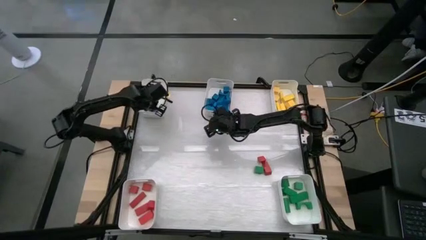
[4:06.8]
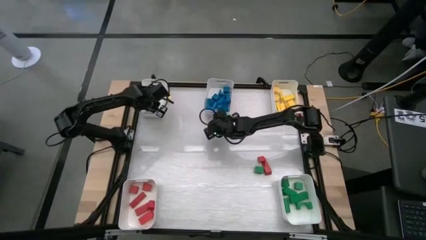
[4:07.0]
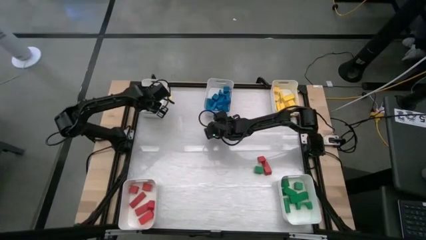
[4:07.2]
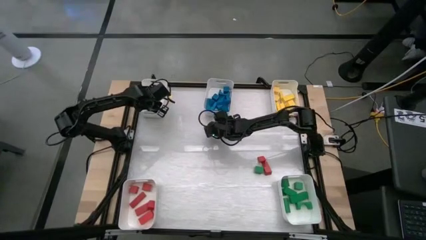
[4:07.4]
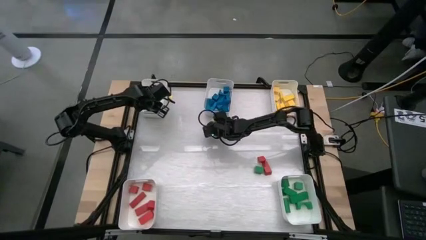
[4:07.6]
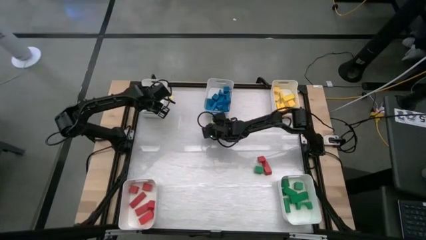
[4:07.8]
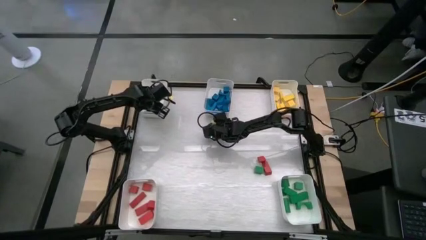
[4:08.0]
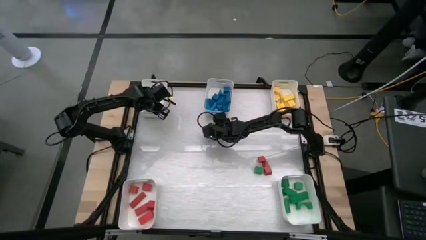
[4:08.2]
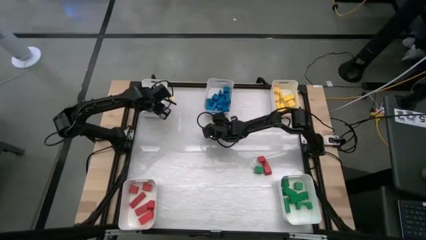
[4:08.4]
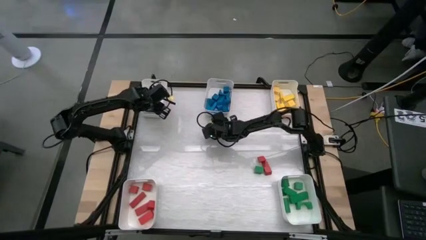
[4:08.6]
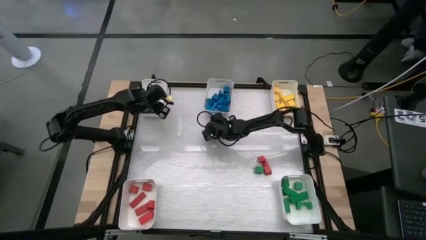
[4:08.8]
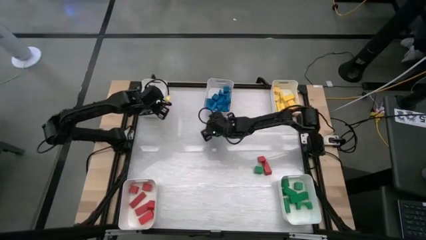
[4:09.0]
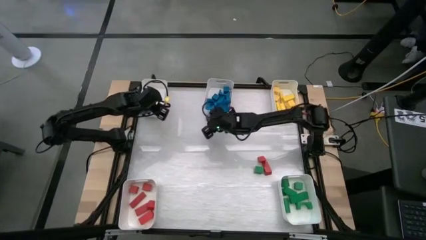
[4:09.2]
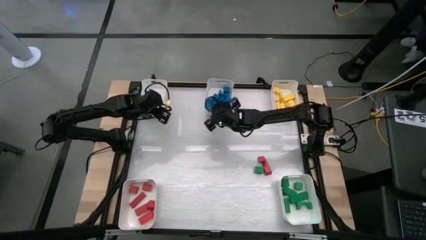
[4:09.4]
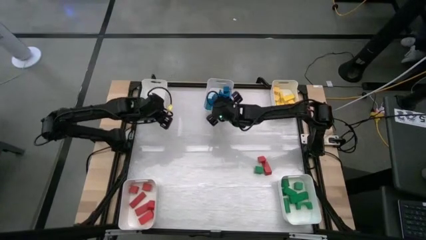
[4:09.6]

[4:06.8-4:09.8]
Task: Sort blocks
Put the blue block into the top center white bin

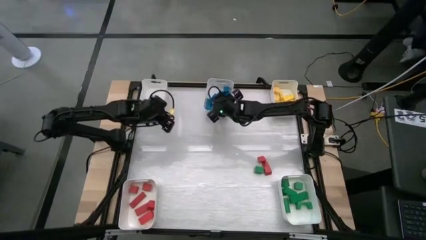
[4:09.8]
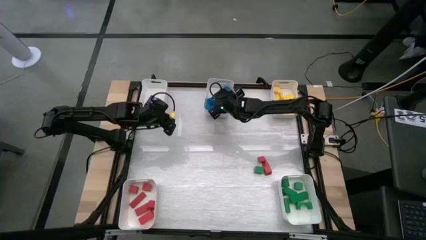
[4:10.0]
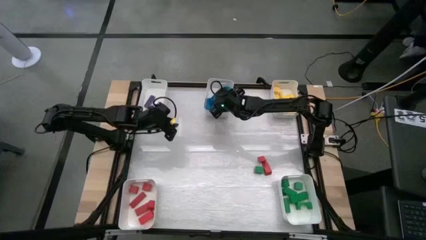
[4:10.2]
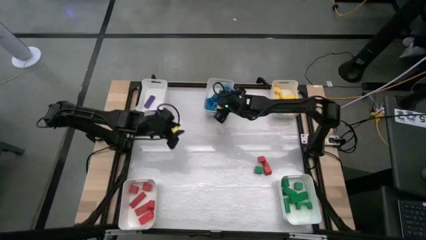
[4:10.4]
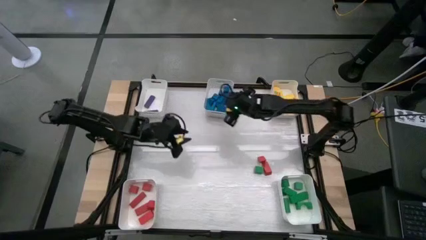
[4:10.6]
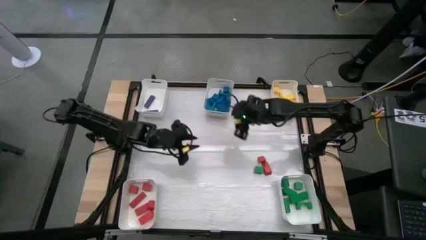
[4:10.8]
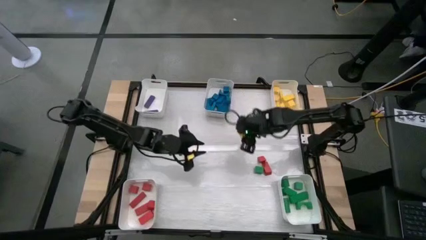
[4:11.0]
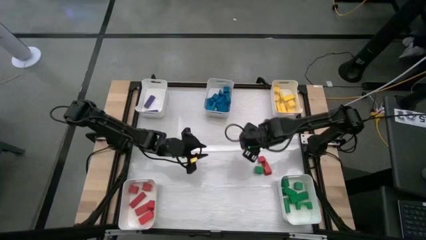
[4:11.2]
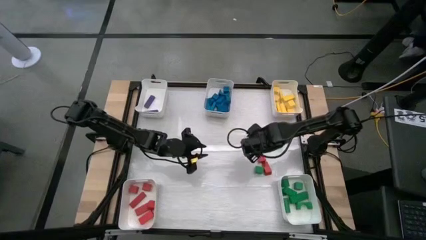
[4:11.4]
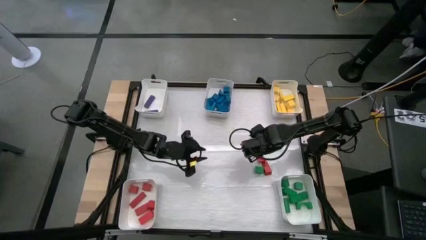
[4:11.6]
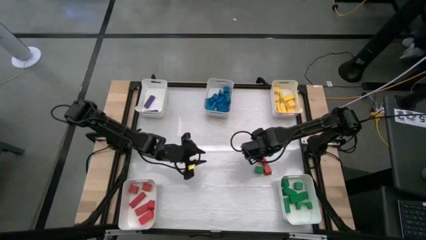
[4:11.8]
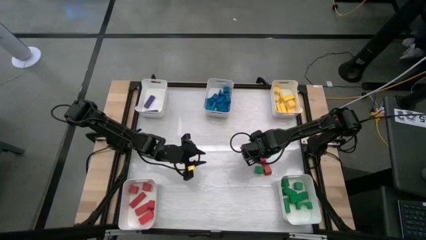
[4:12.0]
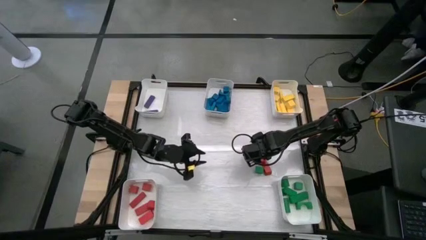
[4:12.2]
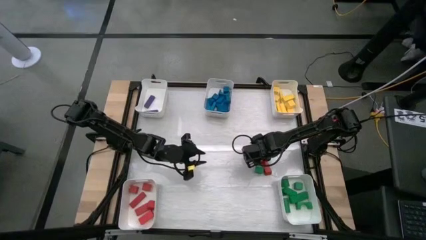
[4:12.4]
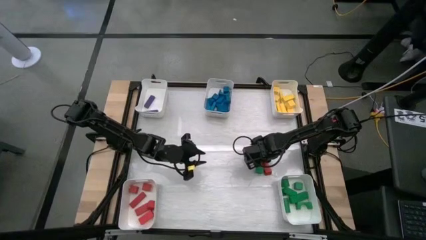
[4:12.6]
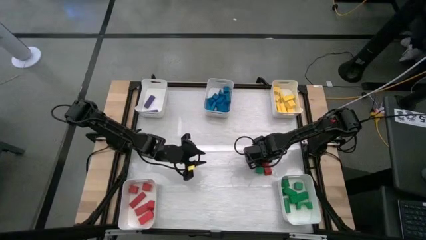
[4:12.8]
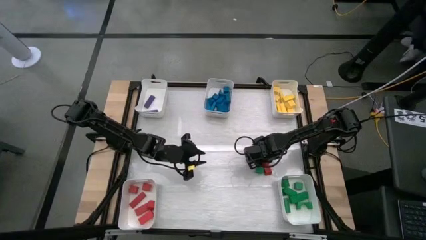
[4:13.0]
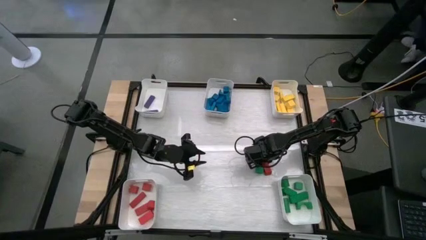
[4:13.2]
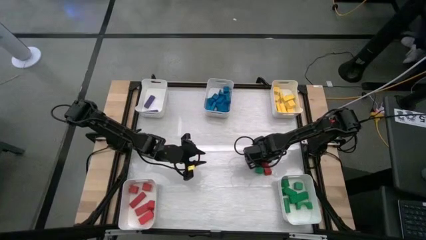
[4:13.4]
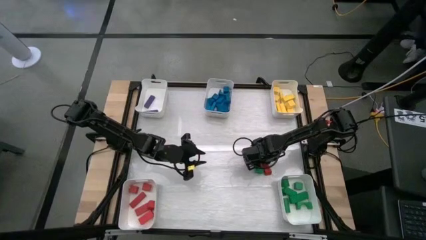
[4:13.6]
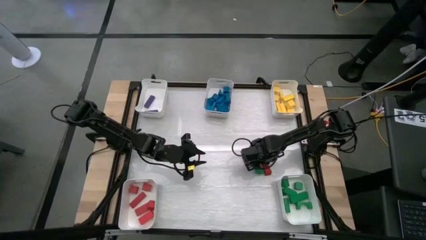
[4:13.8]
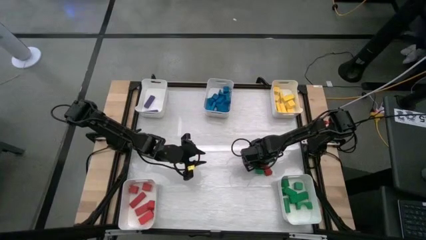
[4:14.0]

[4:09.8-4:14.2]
Put the red block into the bottom left white bin

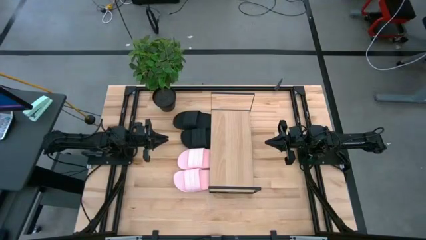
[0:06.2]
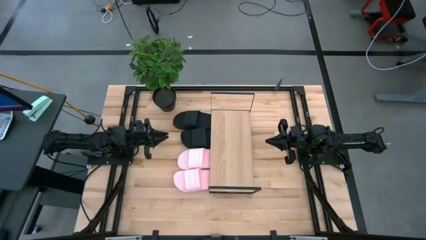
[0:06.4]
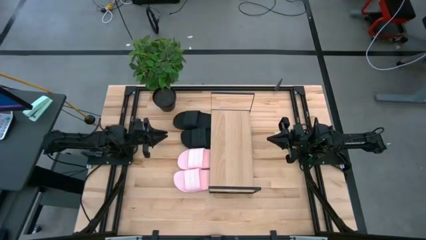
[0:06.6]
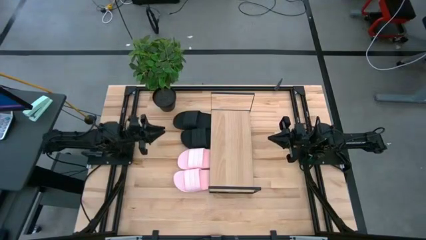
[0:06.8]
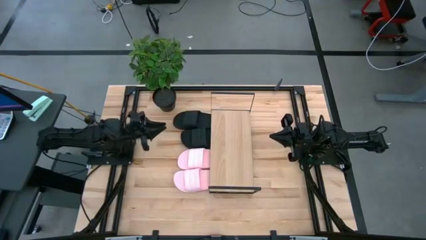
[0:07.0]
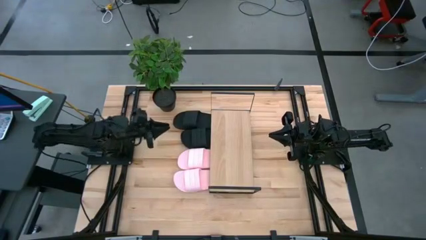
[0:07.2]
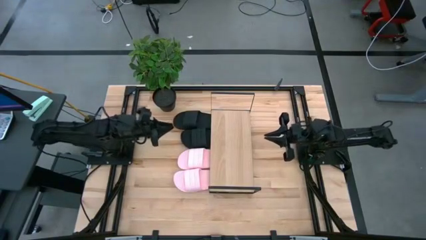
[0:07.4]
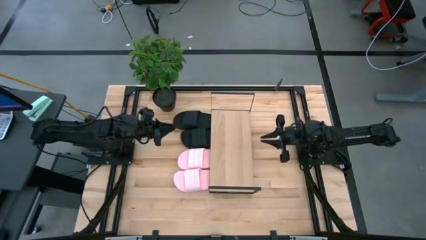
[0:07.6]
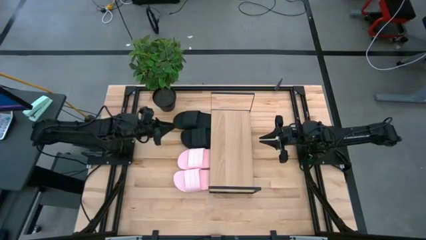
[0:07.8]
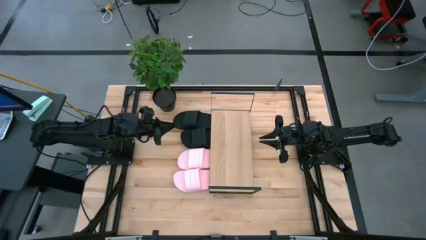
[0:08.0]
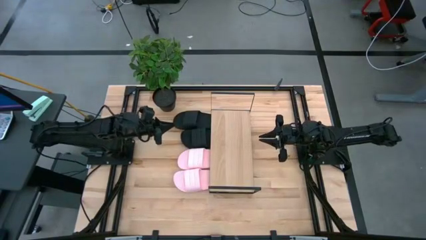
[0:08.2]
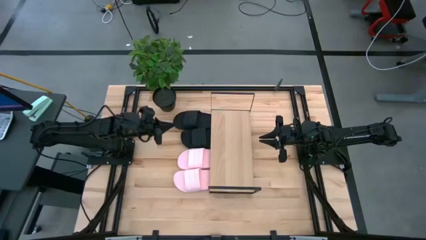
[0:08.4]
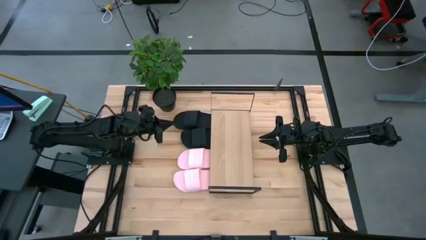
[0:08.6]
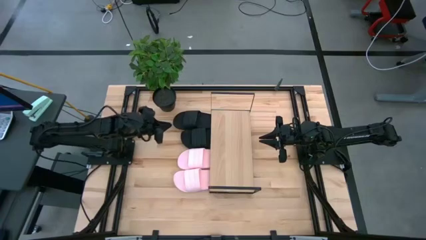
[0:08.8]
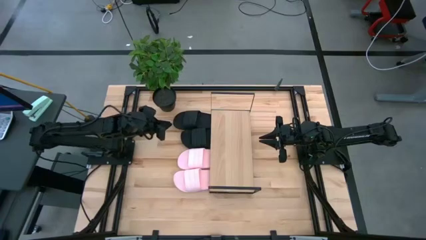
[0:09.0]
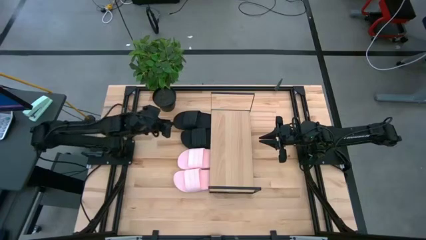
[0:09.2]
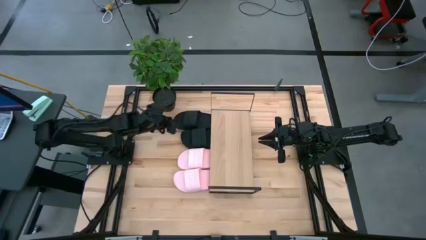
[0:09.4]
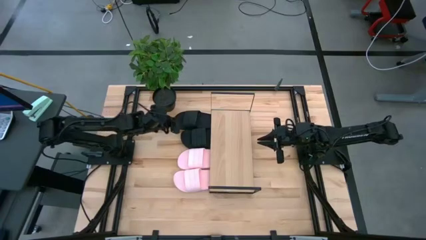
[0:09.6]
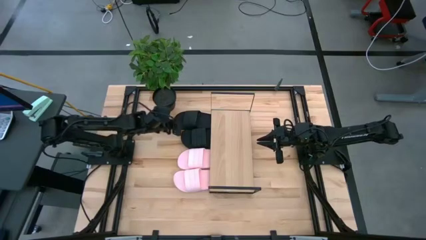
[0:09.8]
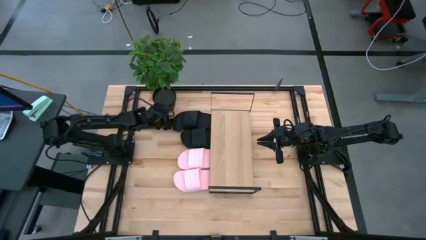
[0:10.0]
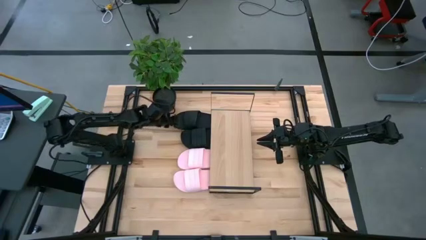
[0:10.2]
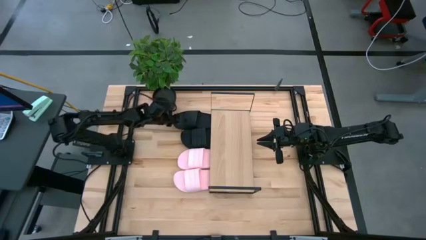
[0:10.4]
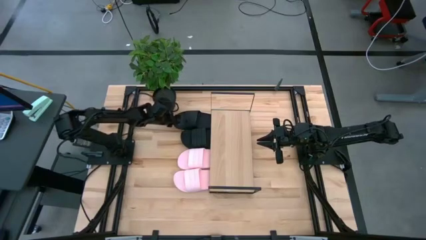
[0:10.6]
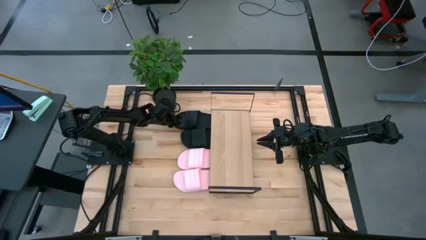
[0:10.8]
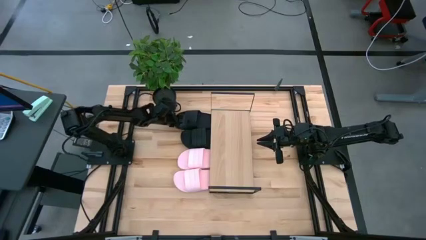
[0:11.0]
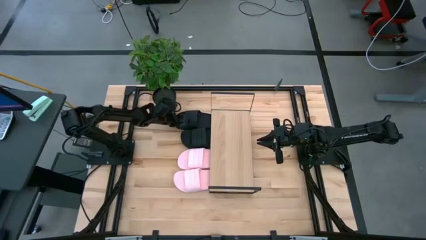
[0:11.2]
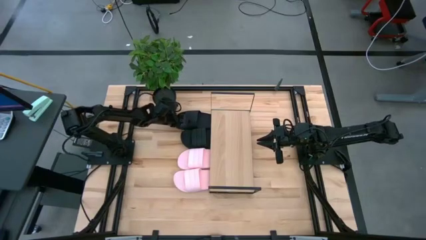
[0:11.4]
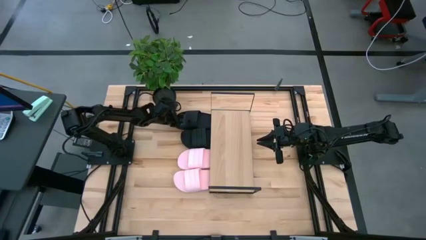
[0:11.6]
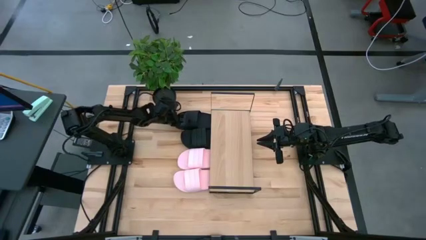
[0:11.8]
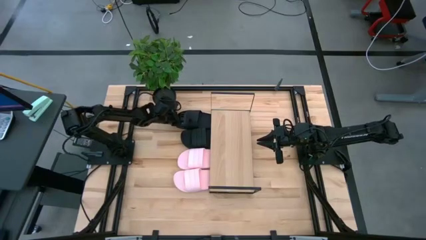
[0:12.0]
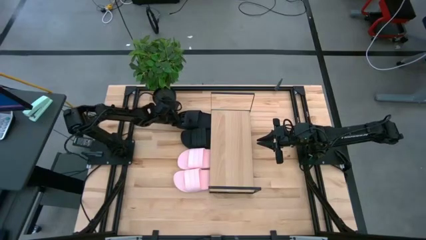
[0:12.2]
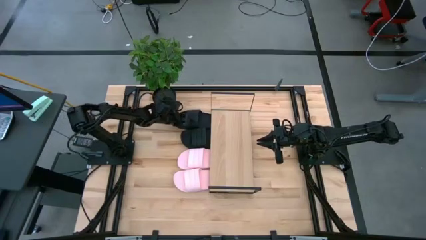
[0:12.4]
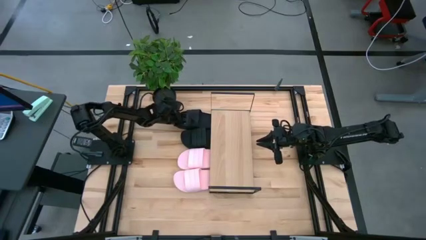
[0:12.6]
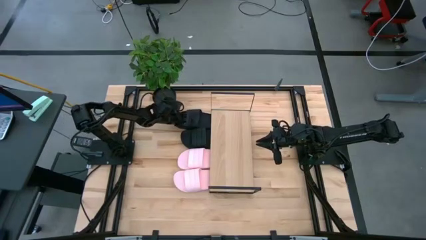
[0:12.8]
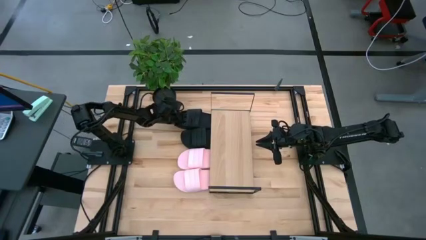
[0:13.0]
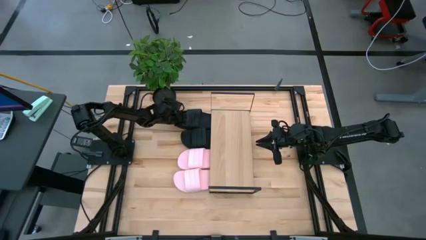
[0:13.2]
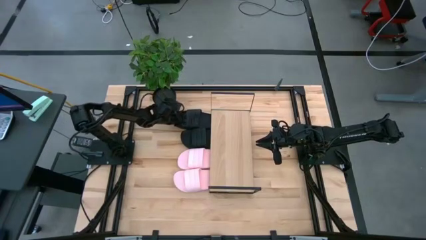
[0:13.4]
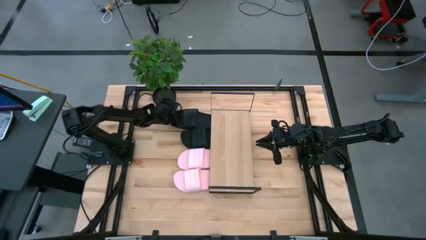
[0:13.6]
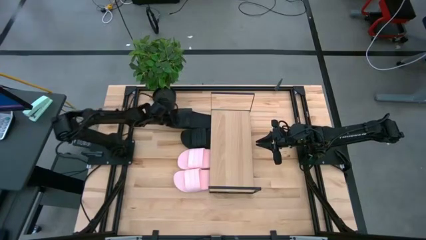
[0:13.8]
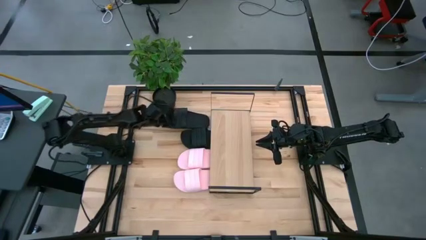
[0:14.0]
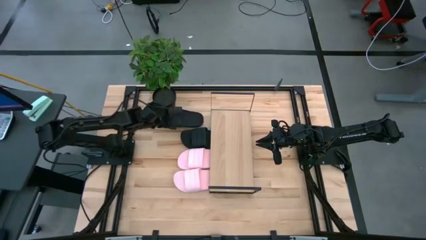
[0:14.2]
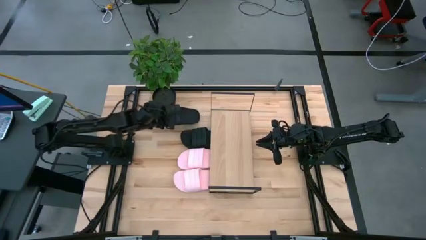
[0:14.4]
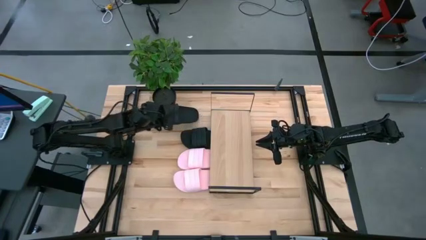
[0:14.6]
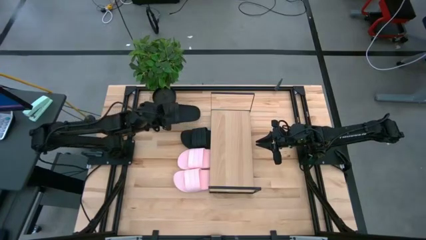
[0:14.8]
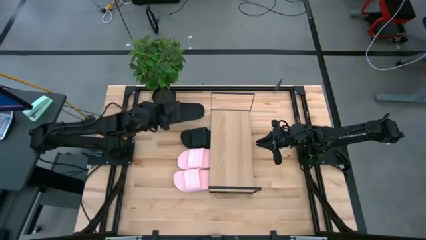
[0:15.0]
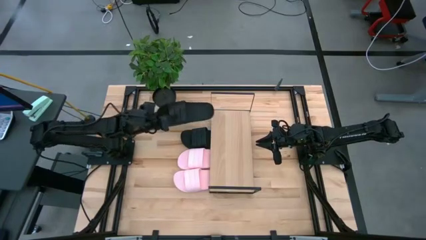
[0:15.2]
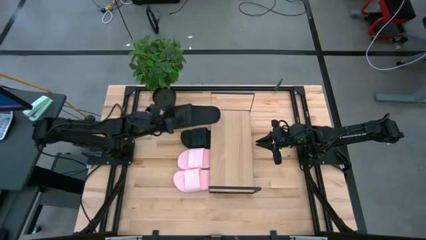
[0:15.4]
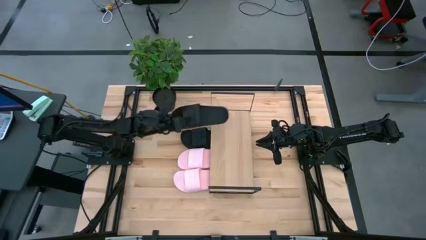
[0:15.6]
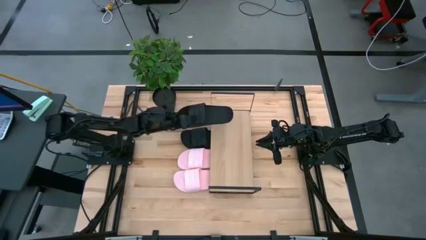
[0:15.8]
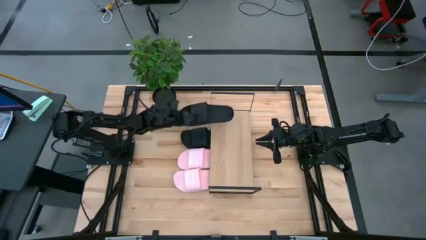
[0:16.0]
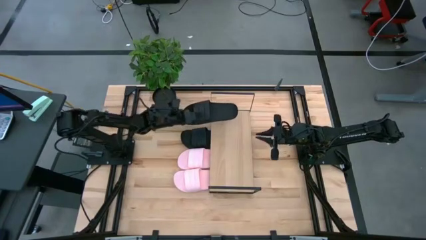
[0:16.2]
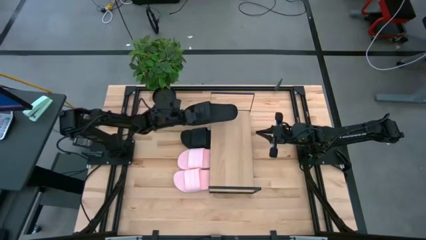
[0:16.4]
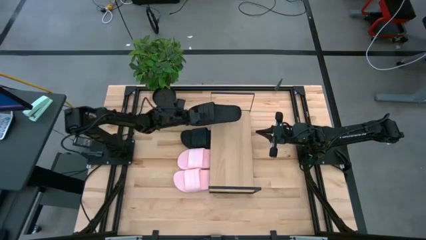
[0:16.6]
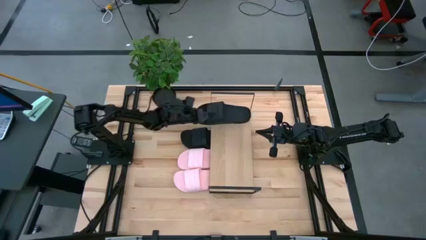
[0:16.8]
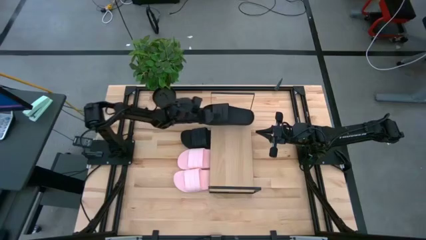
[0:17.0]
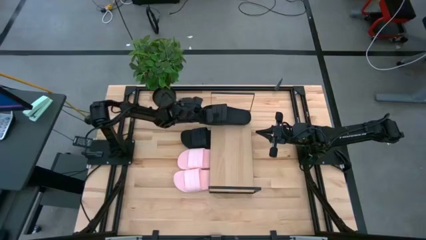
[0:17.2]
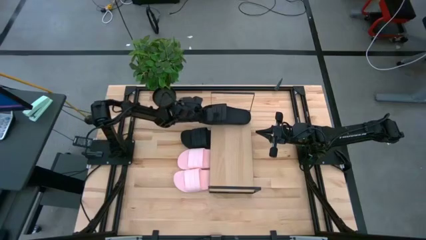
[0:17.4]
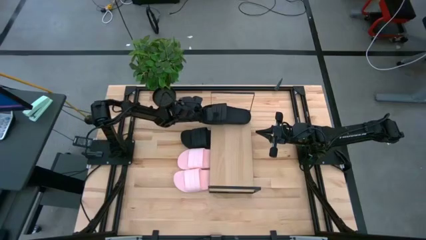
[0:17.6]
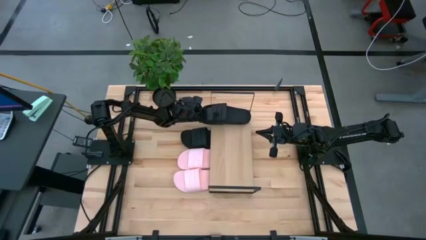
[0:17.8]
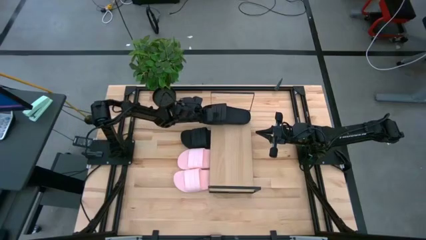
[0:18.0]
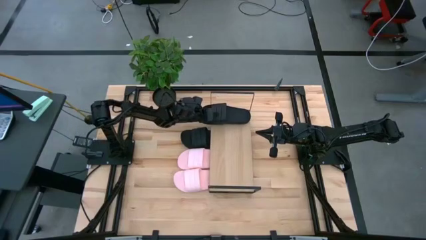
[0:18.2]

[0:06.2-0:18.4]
Task: Pick and place slides into the shelf
Put the top black slides on the shelf
